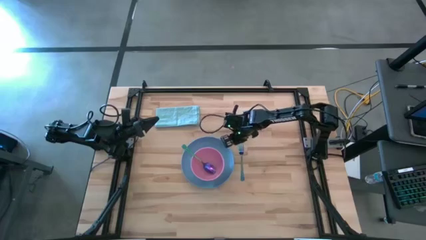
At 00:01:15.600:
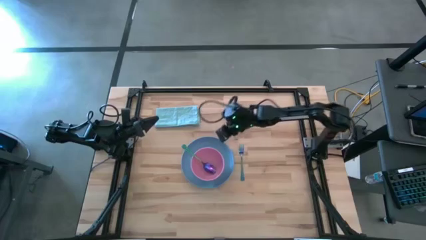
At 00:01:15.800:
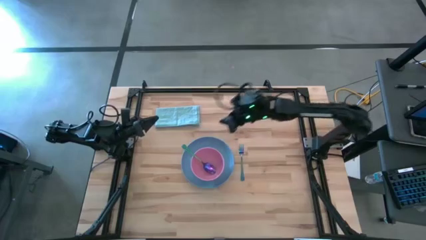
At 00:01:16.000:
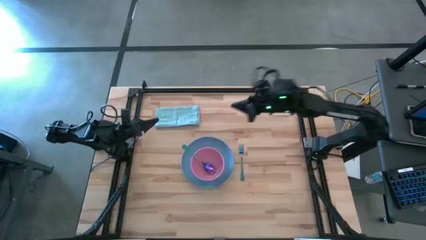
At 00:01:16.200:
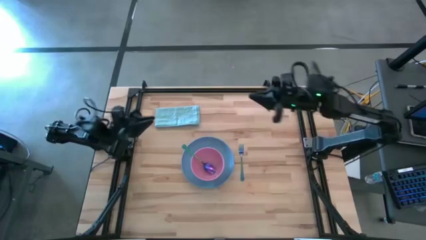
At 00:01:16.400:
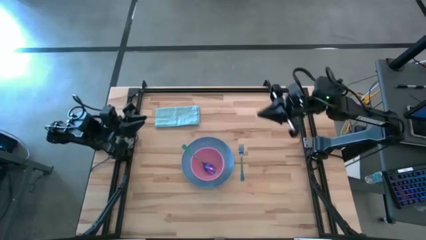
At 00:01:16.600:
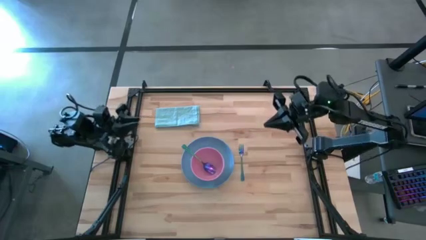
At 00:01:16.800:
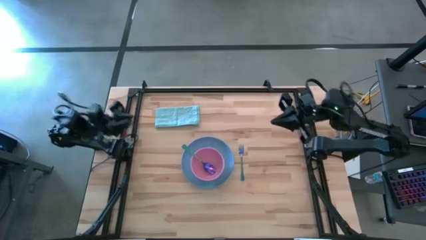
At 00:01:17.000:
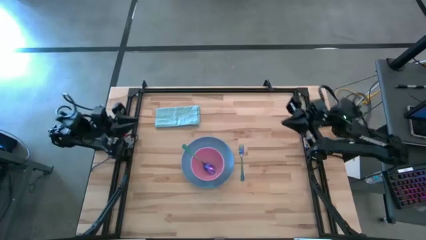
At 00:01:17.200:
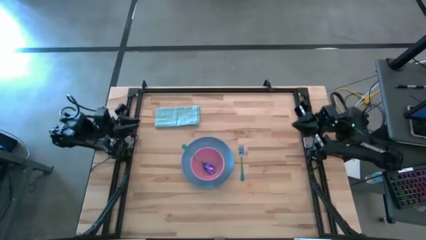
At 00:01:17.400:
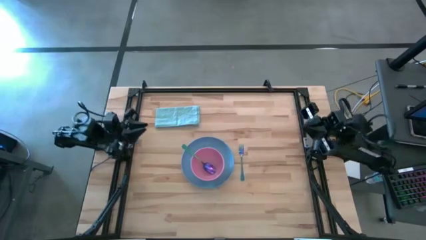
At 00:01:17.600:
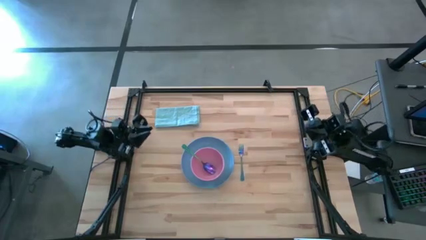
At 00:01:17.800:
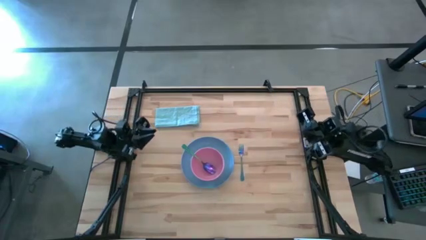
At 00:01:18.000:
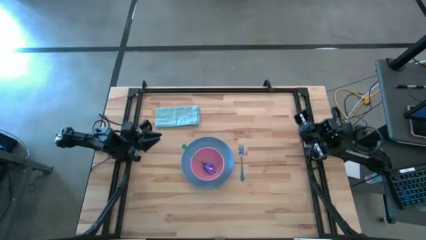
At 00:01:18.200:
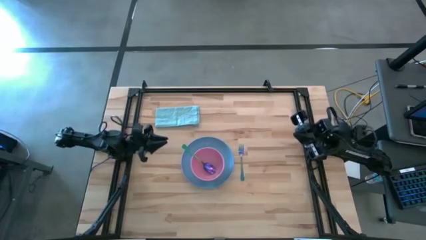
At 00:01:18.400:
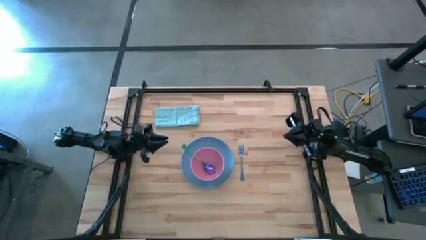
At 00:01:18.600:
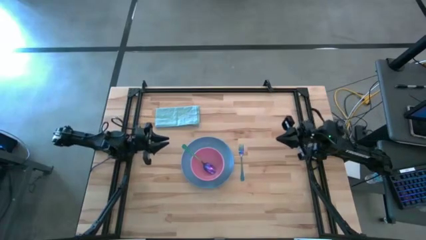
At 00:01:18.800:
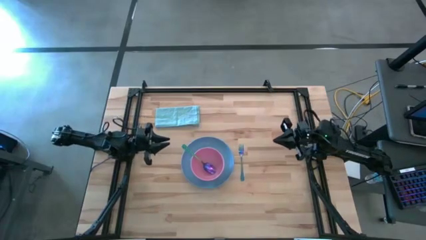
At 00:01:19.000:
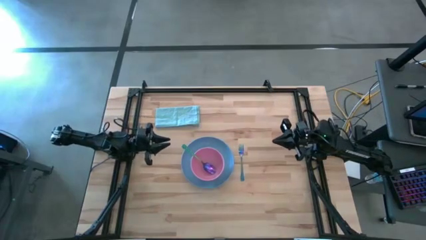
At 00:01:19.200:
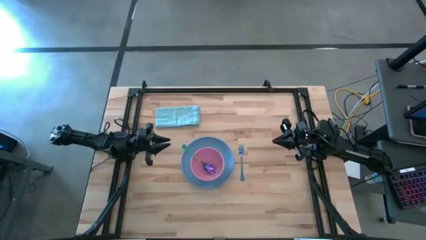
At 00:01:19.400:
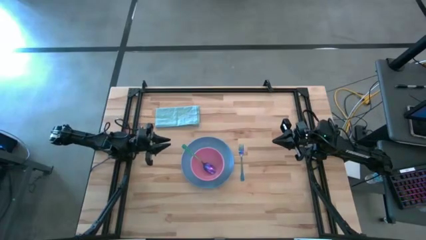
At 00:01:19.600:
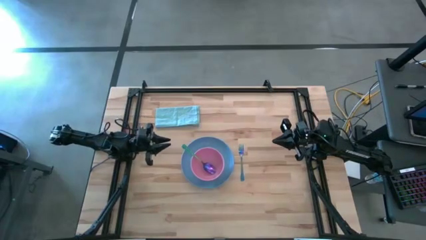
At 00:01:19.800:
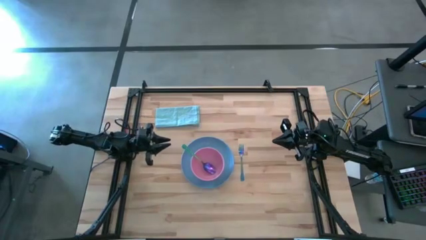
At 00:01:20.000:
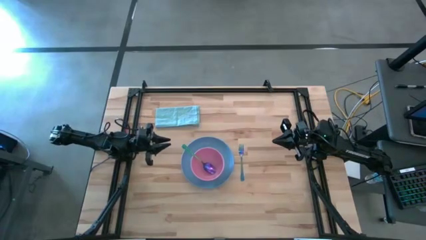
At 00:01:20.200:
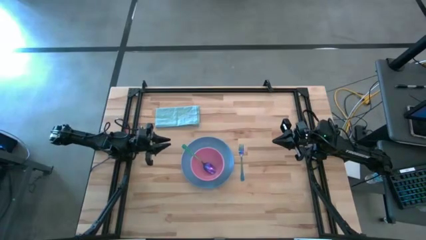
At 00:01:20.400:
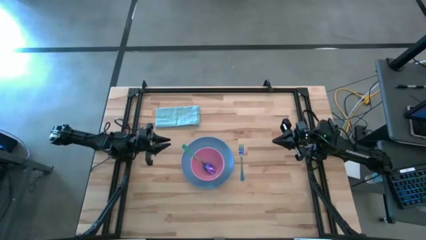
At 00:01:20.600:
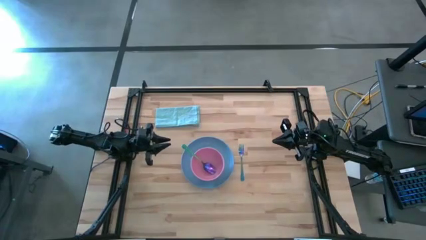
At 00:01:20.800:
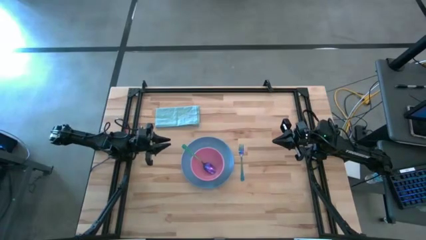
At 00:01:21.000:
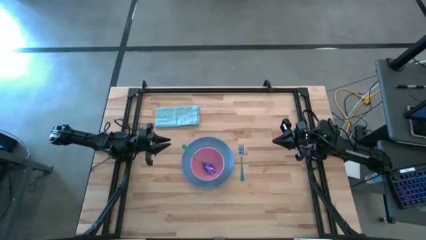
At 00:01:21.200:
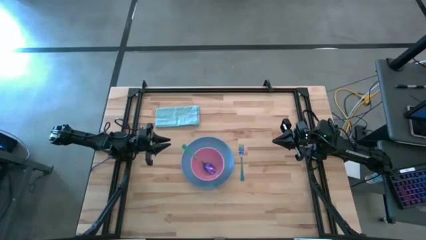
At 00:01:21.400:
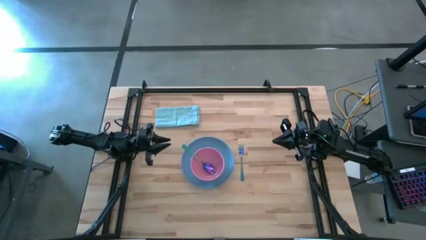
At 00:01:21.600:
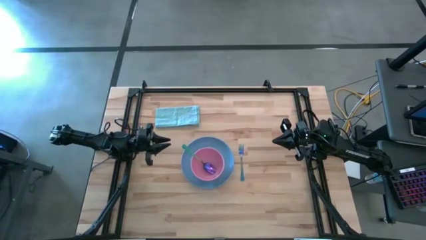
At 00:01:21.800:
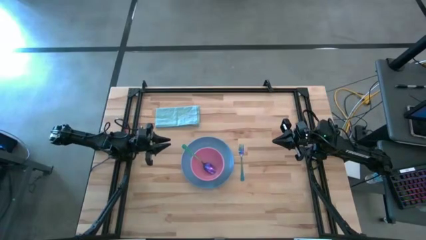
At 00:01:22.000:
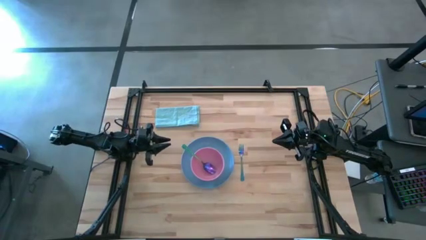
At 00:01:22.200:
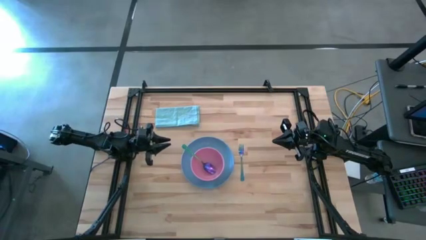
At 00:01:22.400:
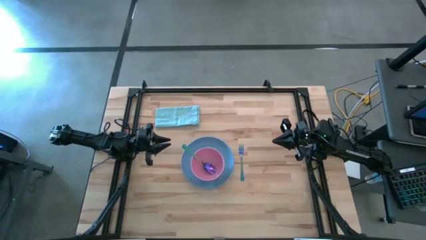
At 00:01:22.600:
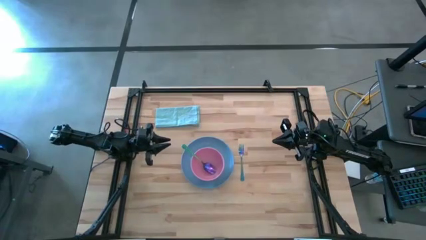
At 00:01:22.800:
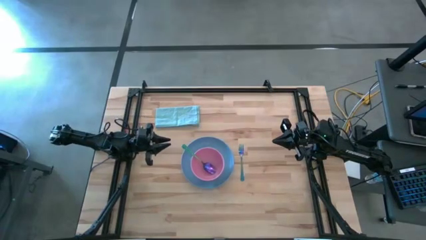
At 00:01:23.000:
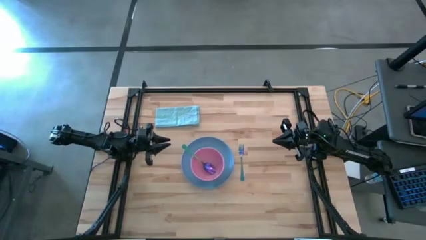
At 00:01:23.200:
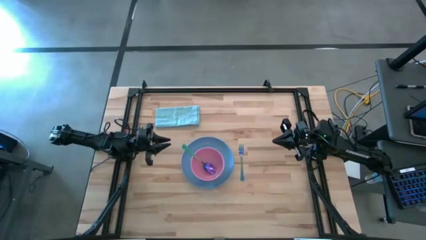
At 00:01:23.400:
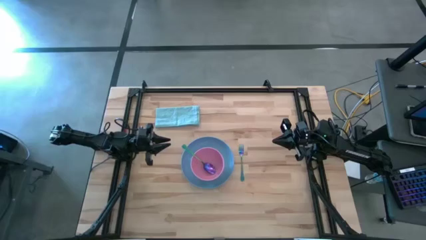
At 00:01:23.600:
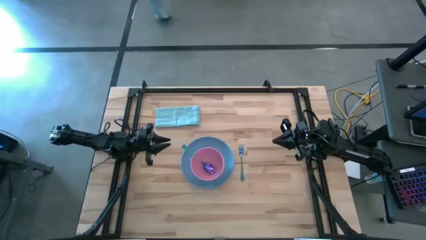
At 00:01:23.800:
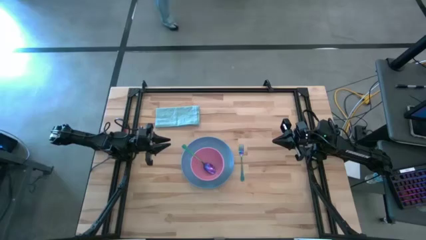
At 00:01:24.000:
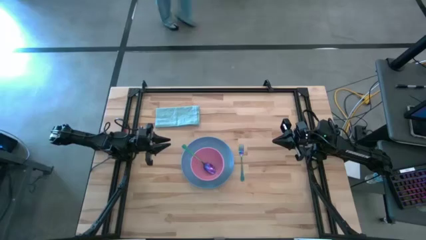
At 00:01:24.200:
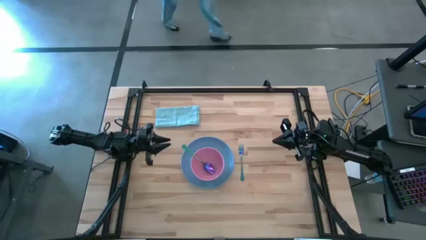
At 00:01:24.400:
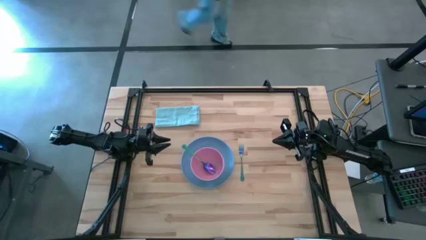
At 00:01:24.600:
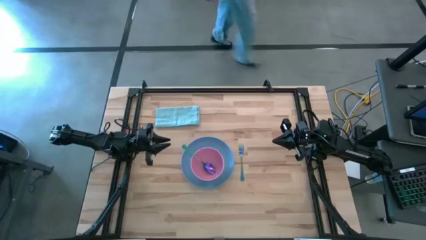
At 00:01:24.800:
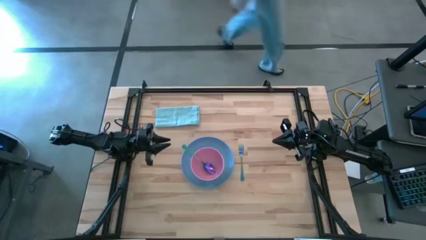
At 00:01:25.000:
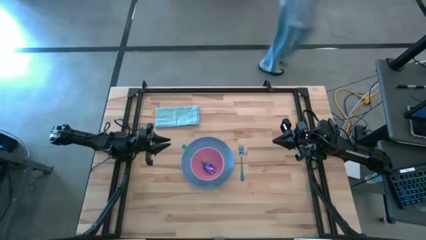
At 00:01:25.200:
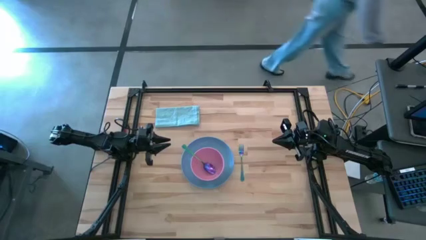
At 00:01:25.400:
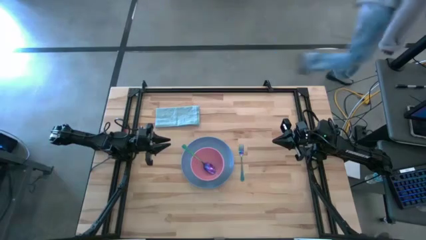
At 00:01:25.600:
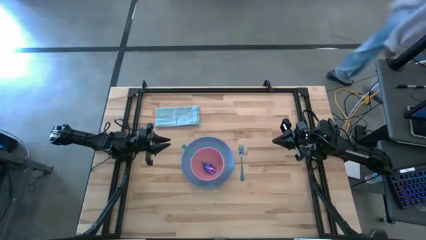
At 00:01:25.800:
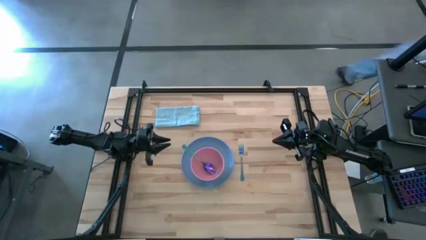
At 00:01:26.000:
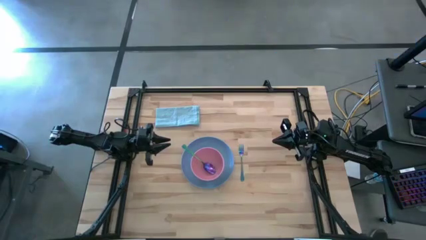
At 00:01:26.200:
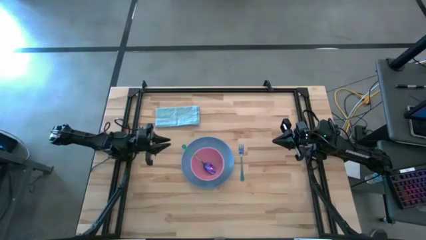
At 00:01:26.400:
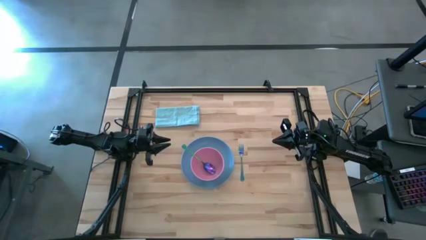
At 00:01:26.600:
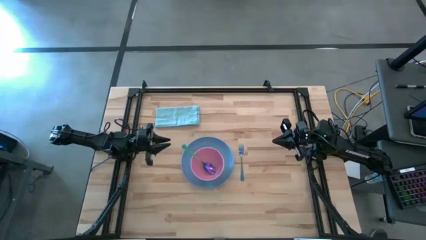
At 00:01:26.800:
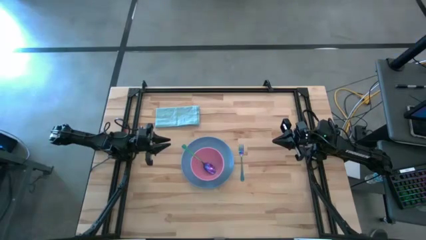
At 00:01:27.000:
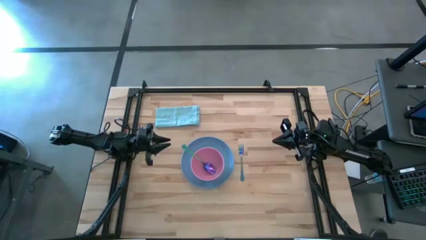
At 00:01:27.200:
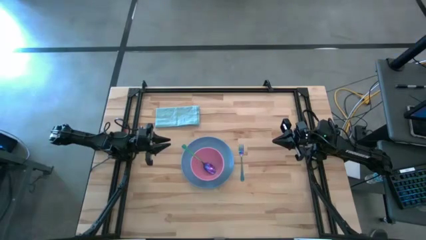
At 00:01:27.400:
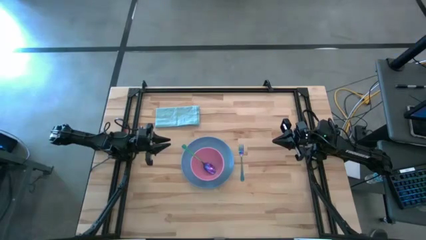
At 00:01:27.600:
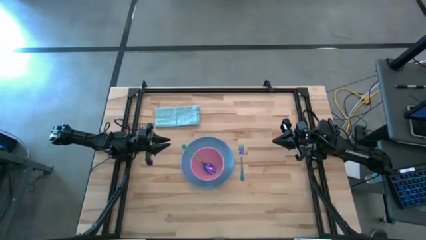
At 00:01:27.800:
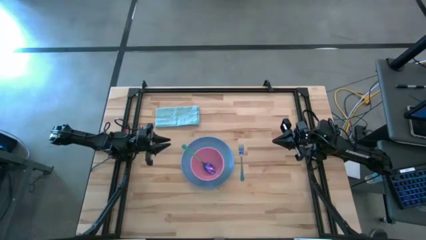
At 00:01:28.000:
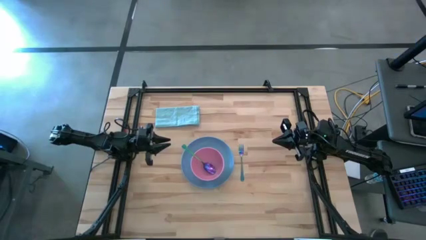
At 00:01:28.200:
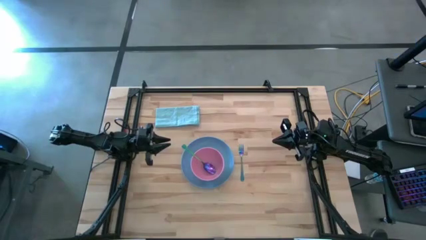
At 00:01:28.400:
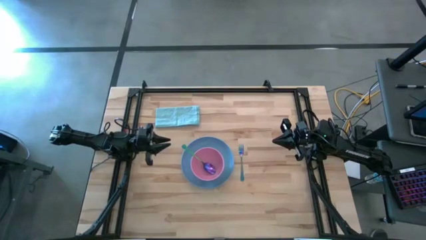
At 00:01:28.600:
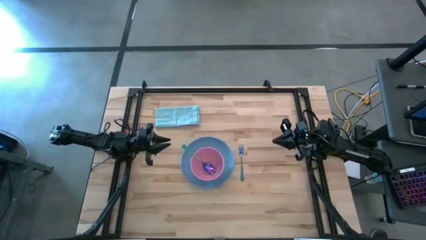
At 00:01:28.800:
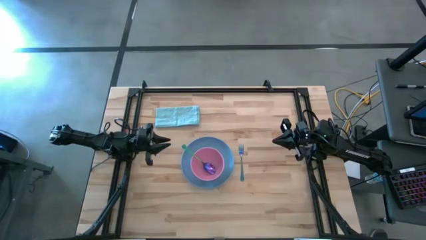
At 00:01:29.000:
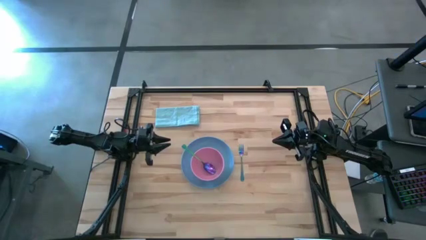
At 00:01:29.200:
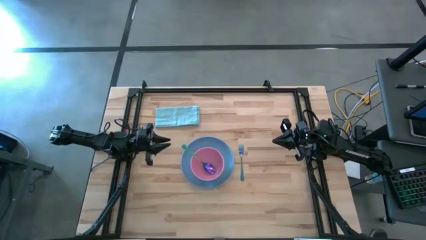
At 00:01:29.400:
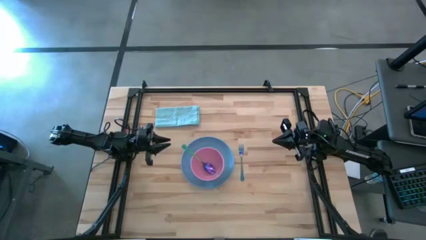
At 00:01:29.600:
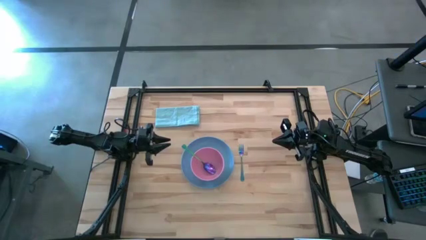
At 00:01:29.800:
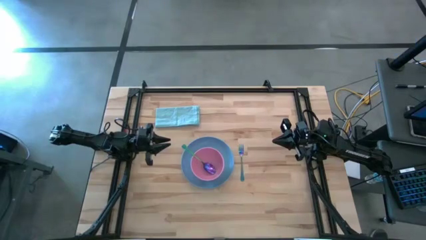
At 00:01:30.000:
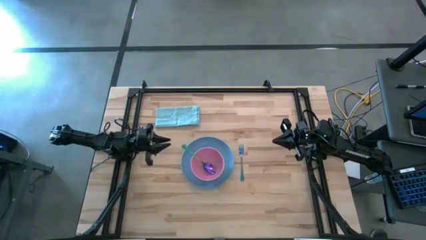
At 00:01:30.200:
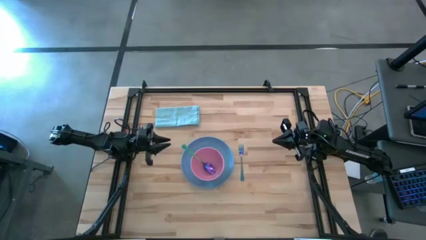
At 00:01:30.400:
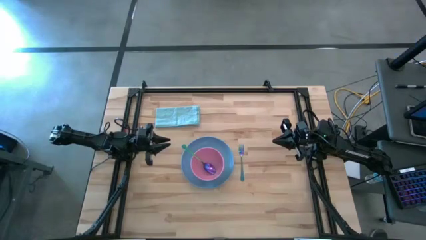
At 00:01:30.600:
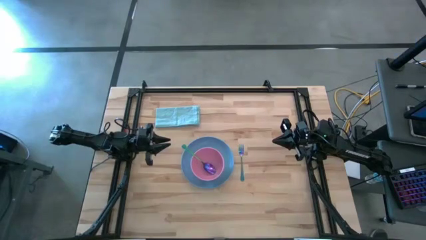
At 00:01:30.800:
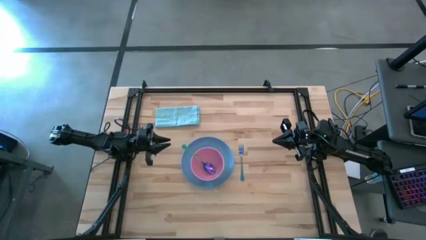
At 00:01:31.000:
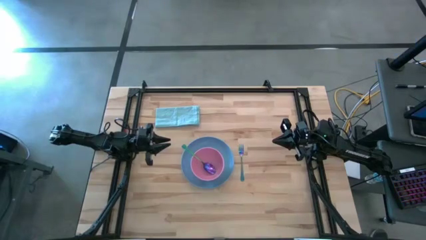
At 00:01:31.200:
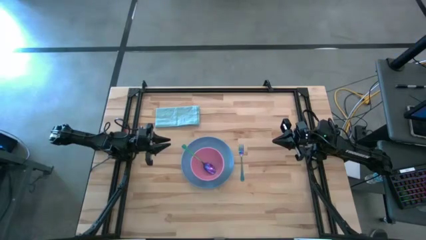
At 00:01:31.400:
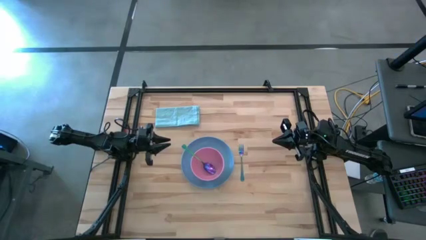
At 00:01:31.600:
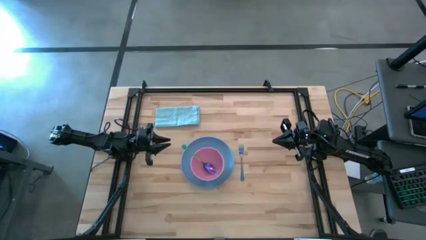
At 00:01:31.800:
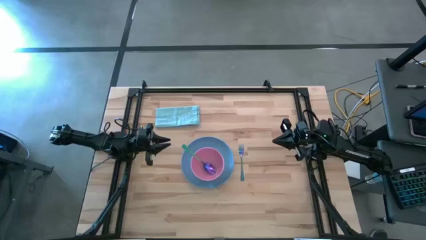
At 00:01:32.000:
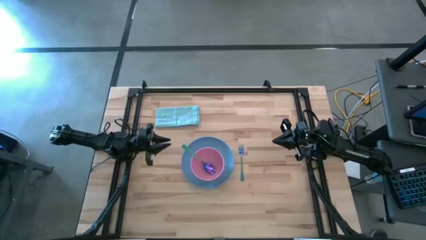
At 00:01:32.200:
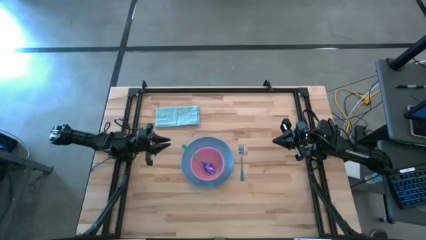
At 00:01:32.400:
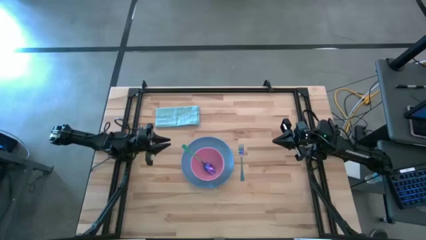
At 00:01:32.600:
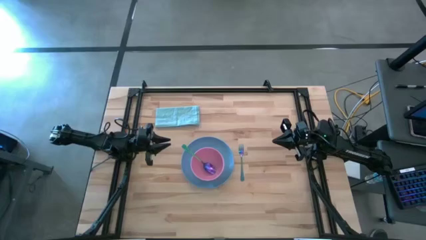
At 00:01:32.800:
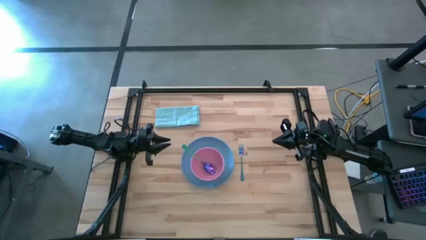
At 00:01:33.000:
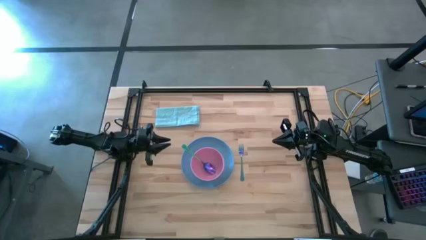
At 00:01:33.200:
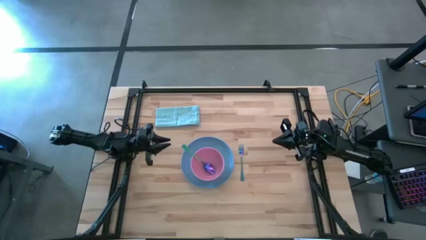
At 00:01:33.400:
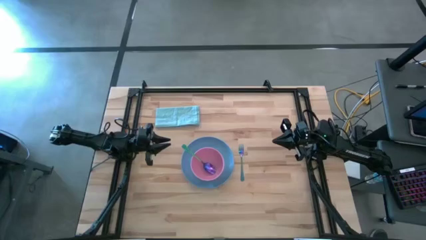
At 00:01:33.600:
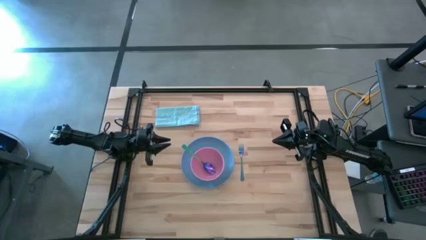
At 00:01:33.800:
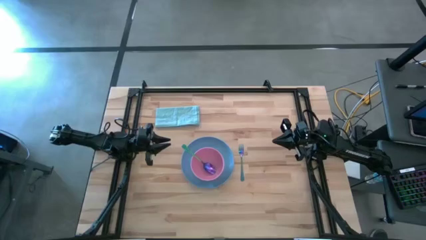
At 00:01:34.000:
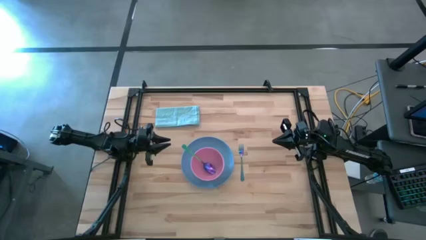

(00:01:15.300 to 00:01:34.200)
Task: Set table place
Return to Home Position
